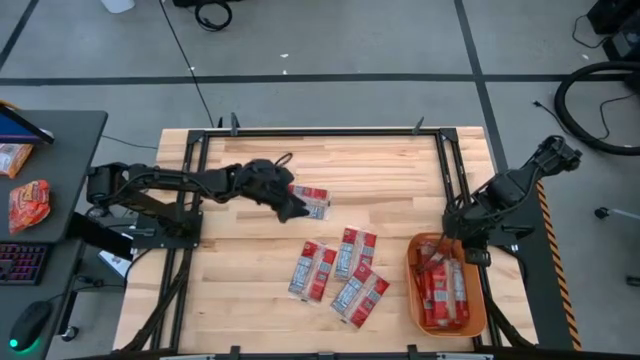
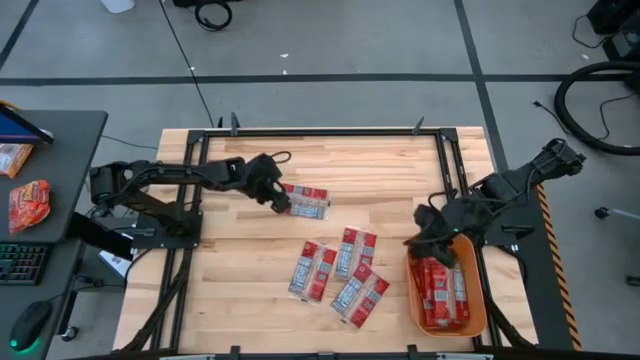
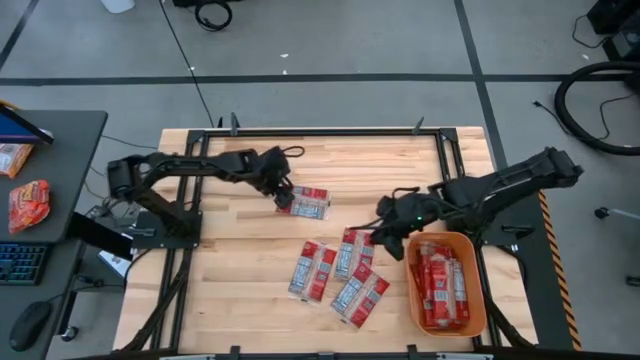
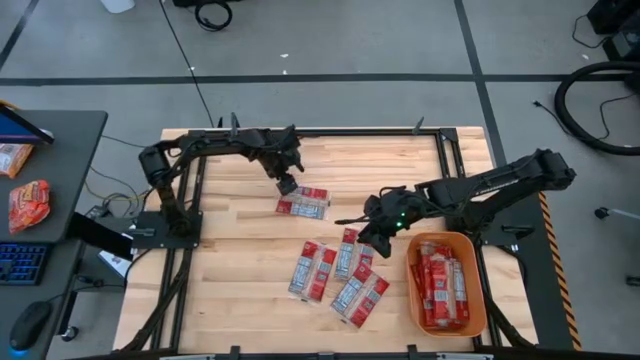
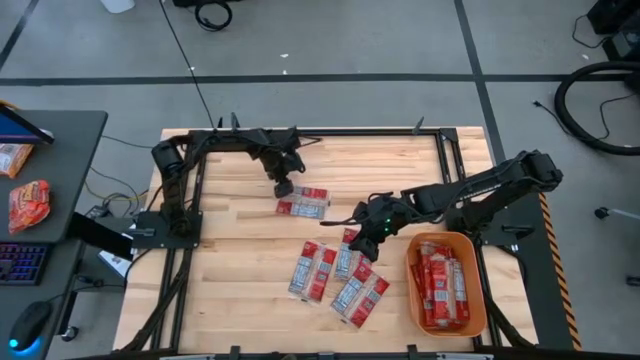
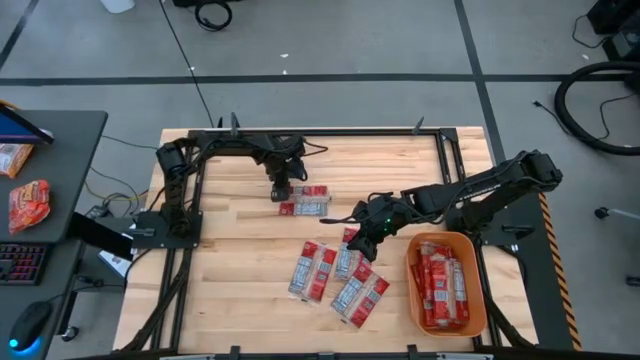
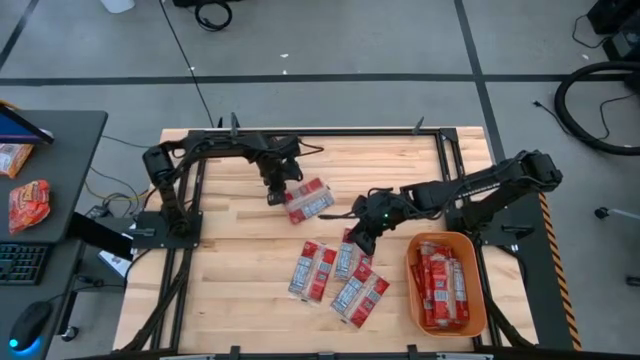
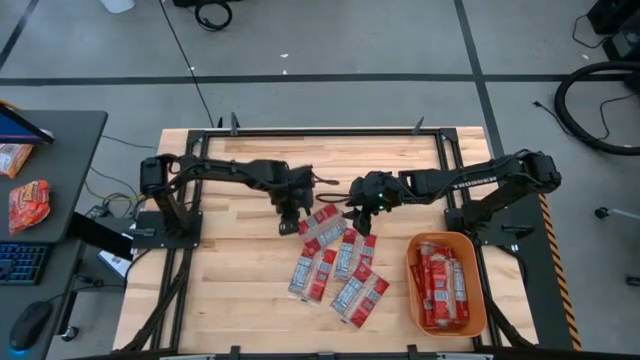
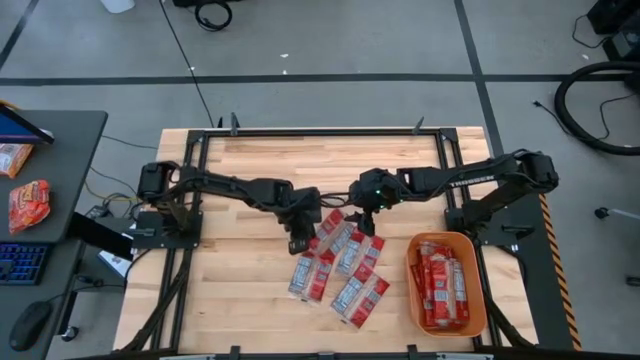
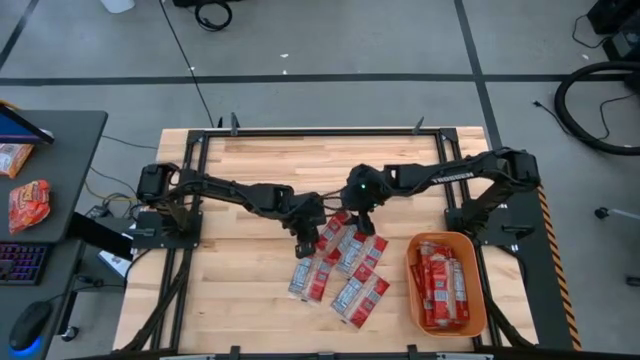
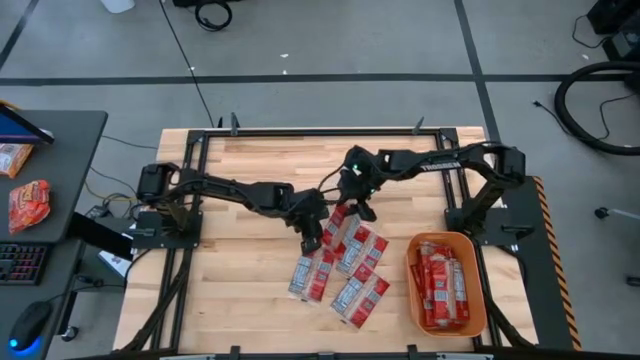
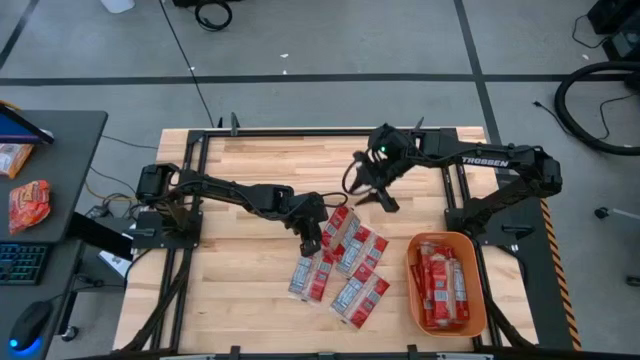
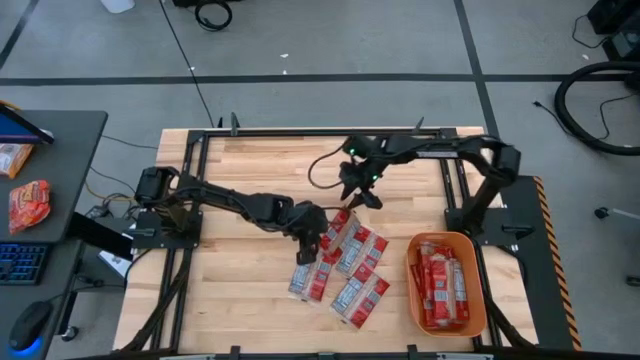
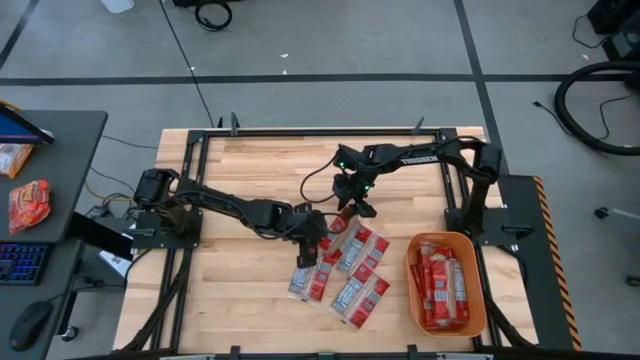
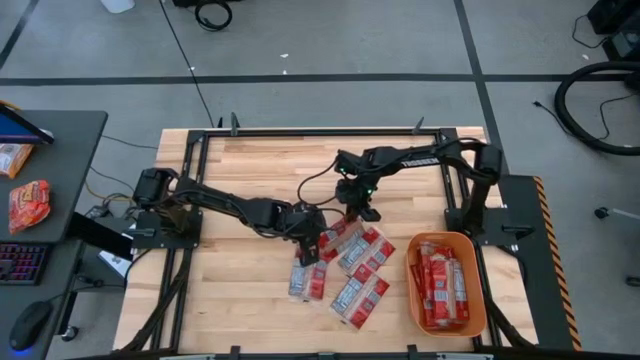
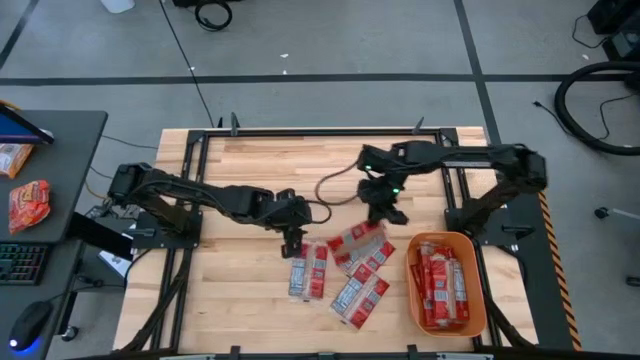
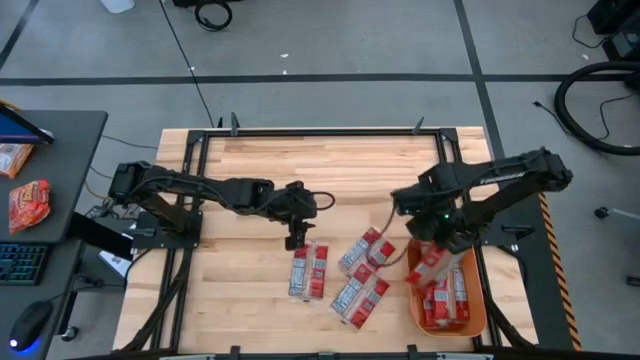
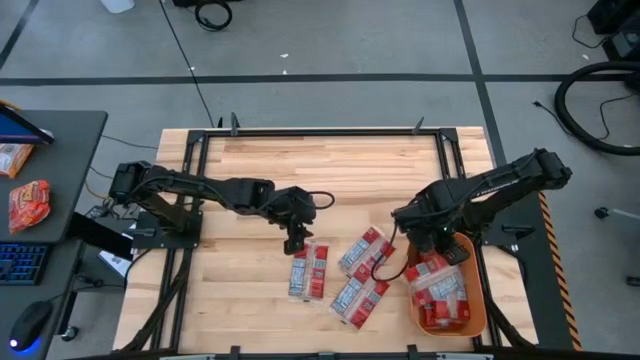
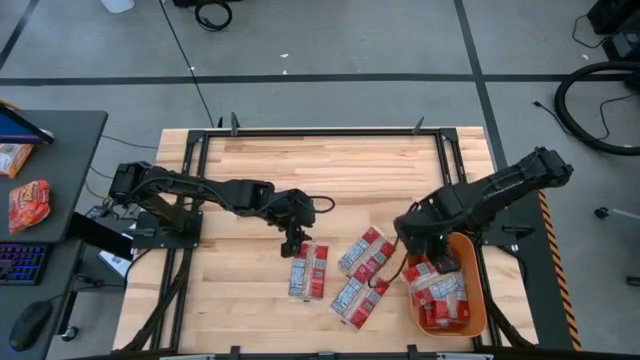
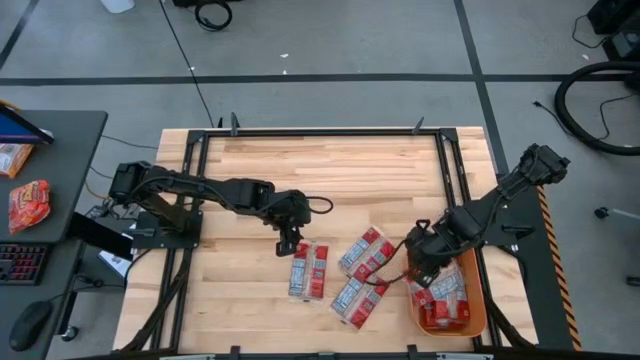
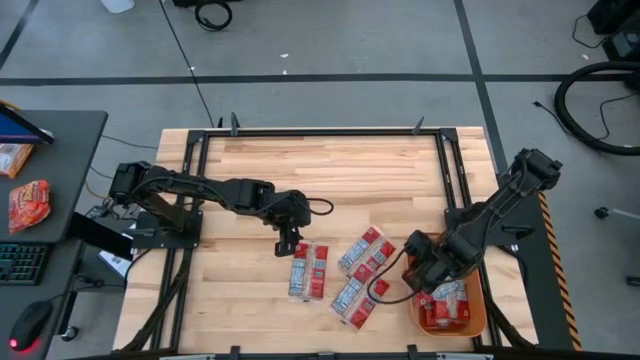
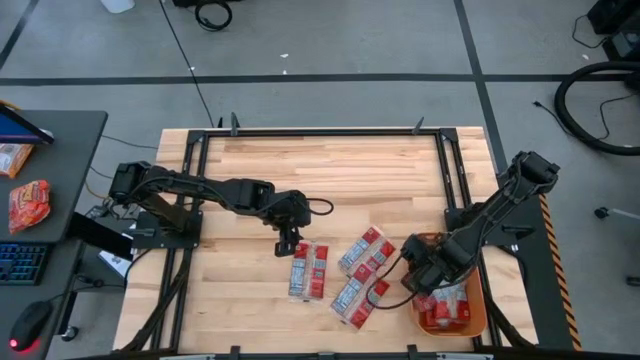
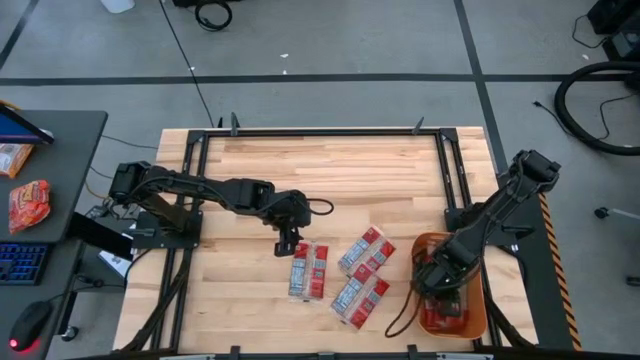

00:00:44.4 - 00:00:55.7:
Task: Sort popcorn bags into baskets
Put the red popcorn bag into the orange bin

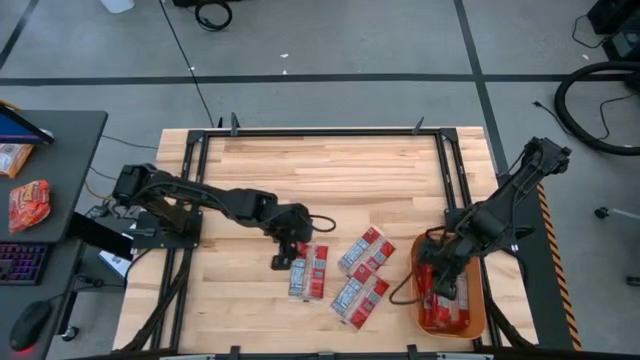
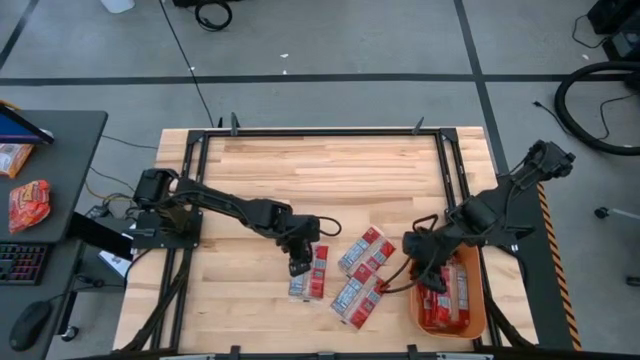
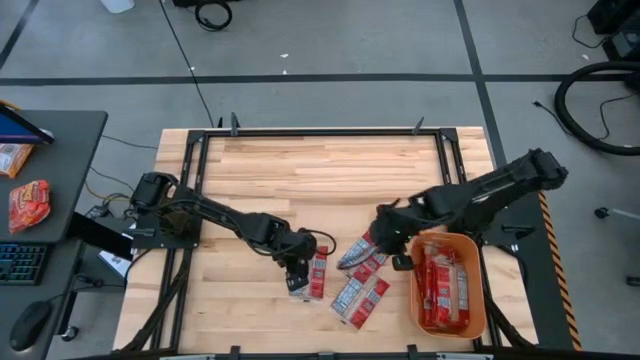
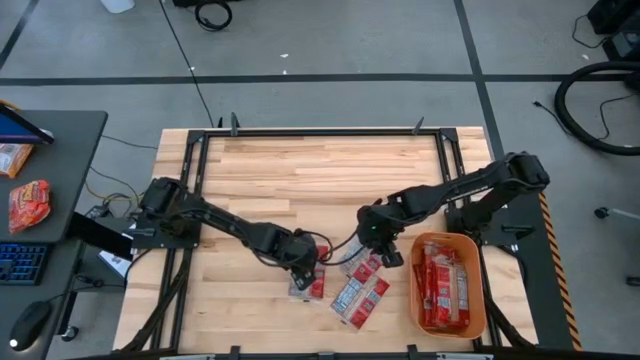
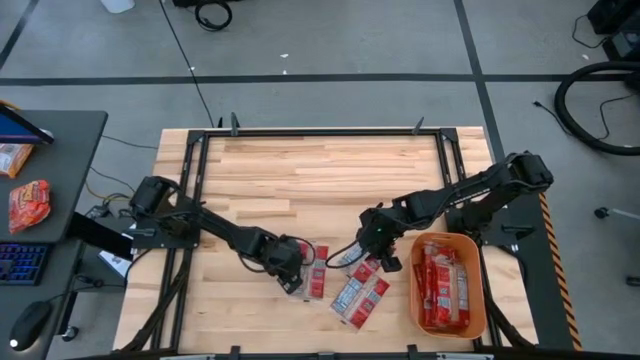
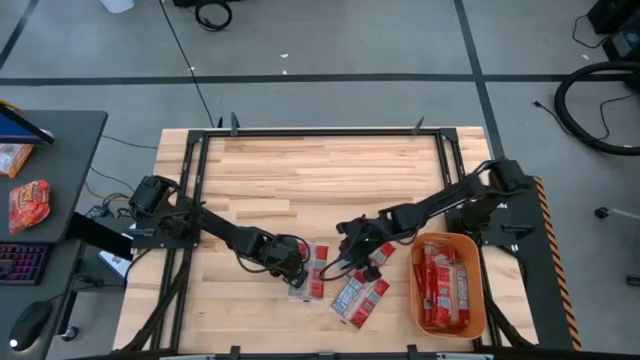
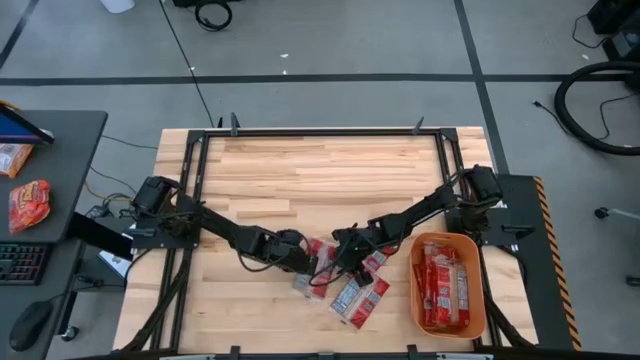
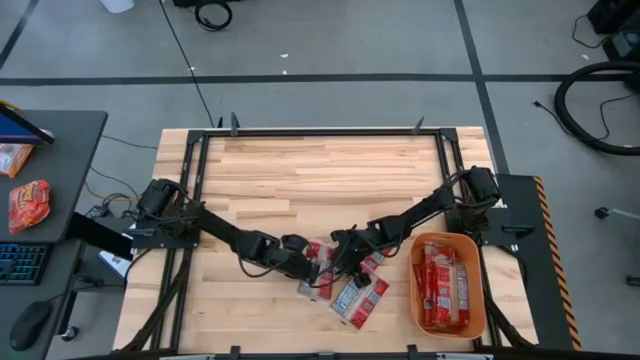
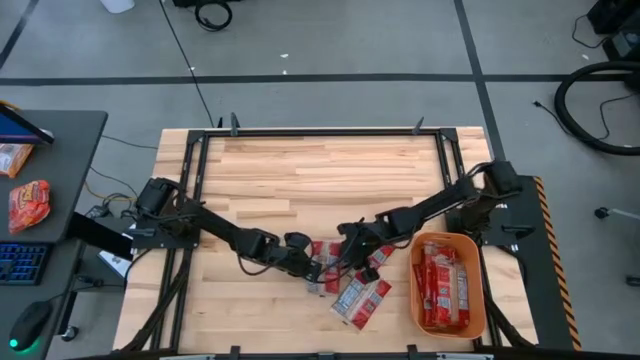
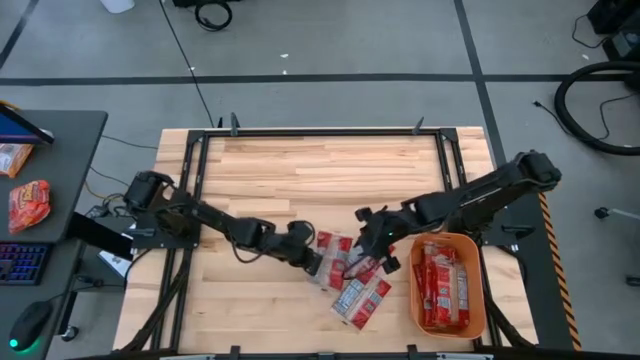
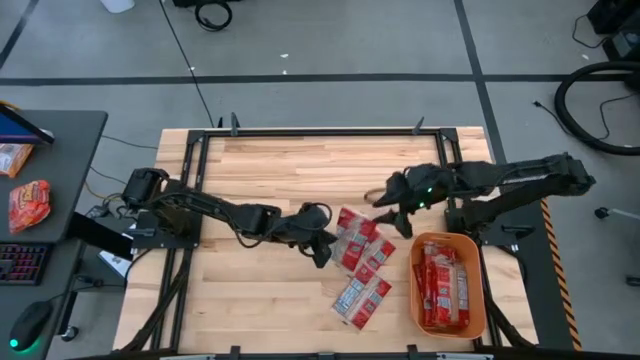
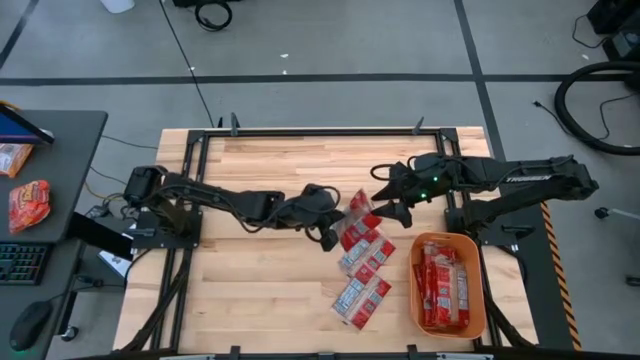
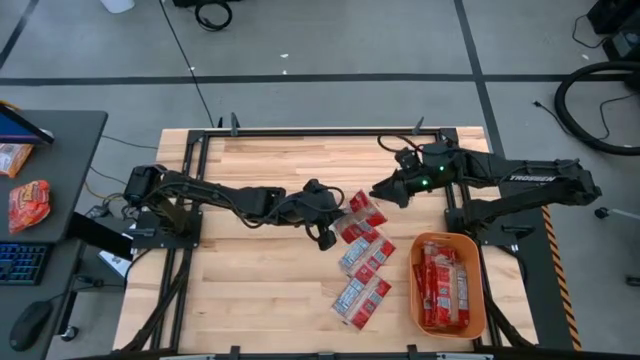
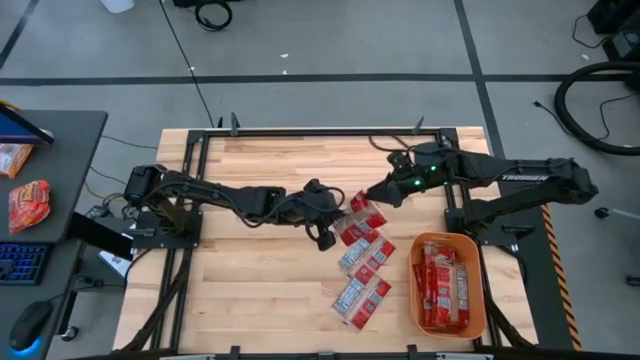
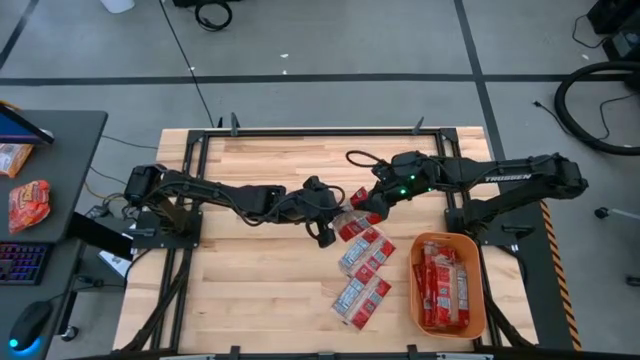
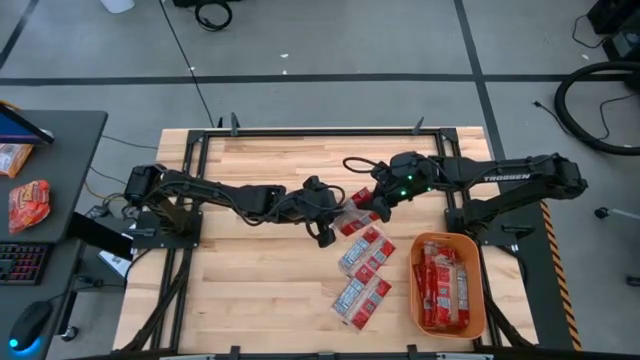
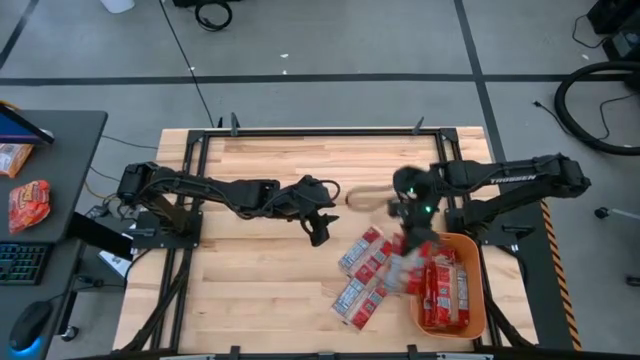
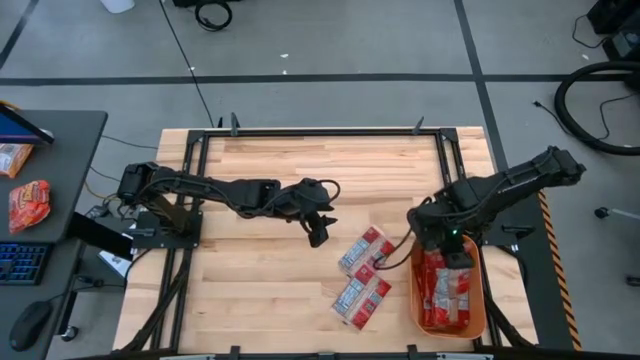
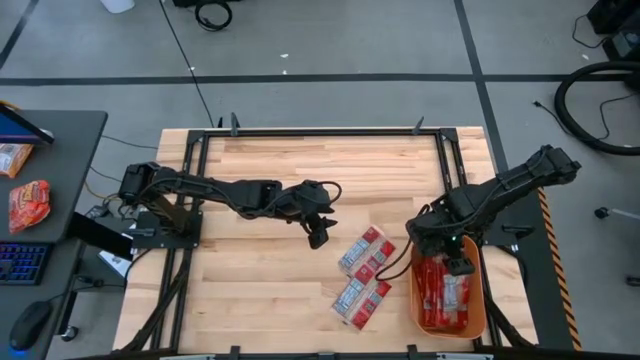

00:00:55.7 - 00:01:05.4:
Put the left red popcorn bag into the orange bin

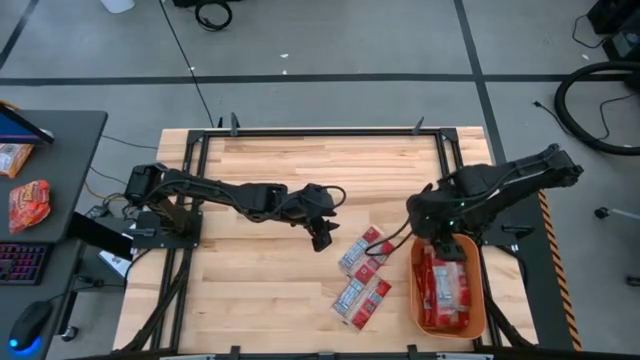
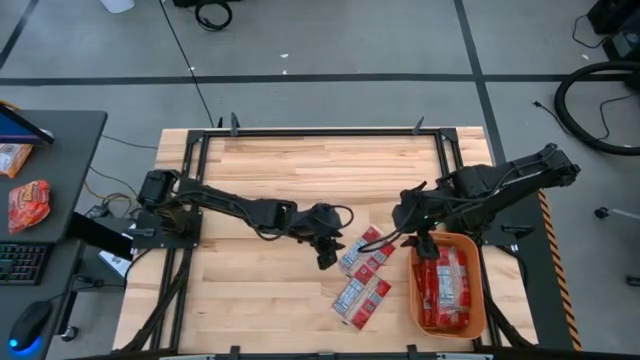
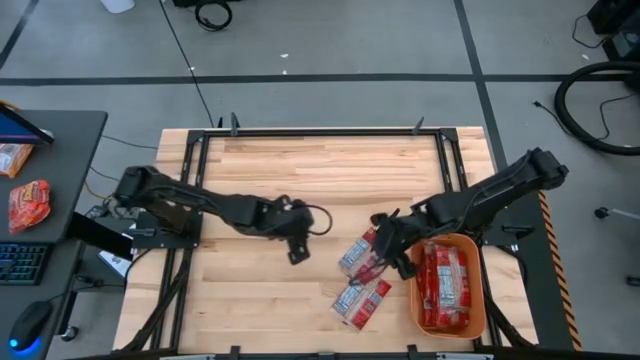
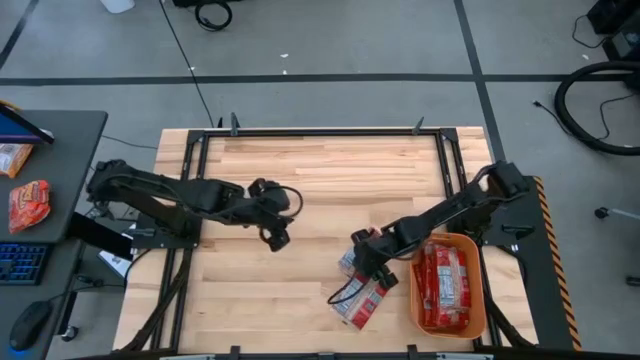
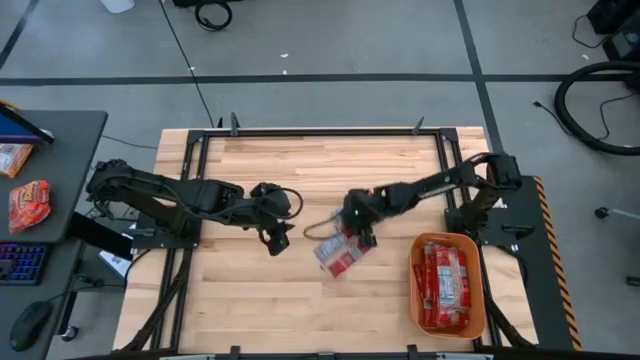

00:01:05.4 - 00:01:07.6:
Adjust the red popcorn bags
